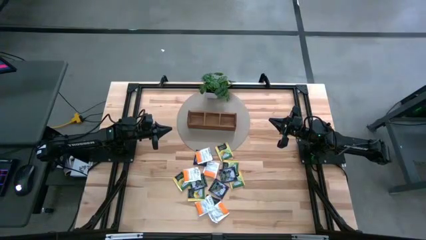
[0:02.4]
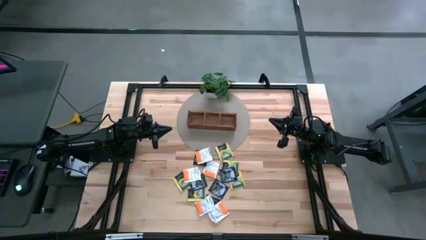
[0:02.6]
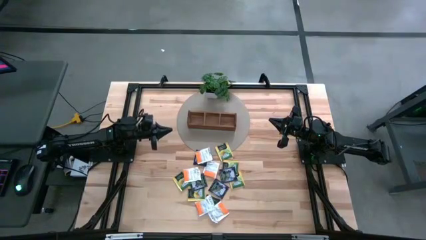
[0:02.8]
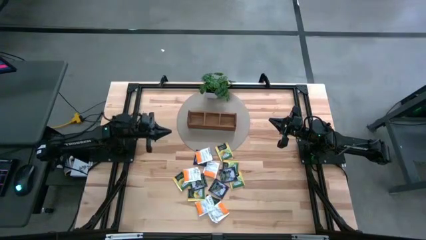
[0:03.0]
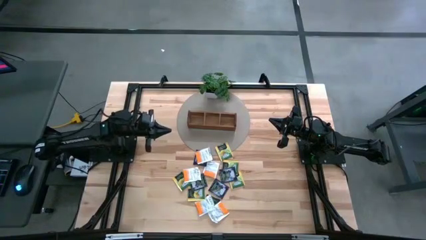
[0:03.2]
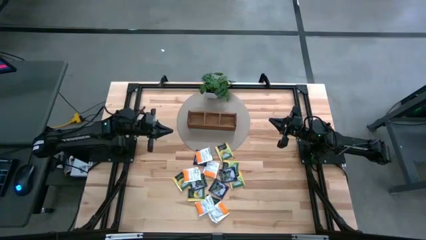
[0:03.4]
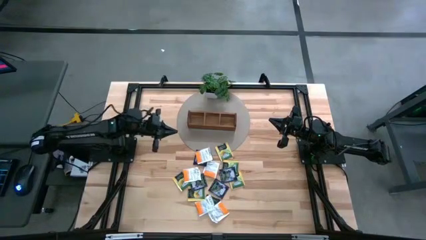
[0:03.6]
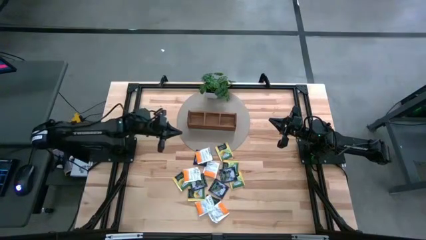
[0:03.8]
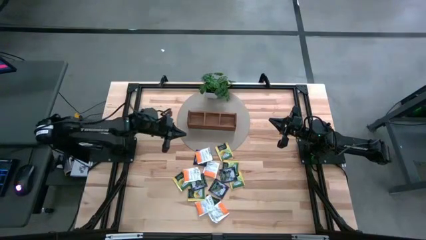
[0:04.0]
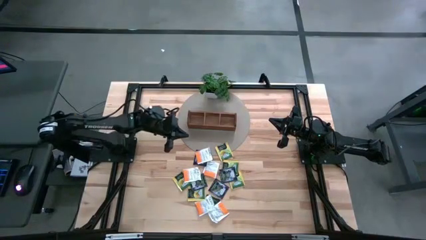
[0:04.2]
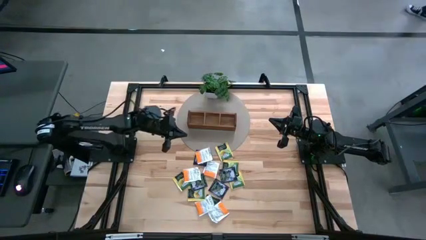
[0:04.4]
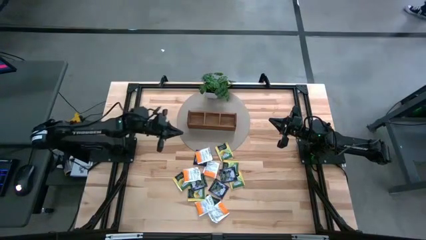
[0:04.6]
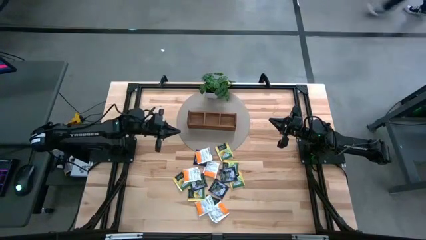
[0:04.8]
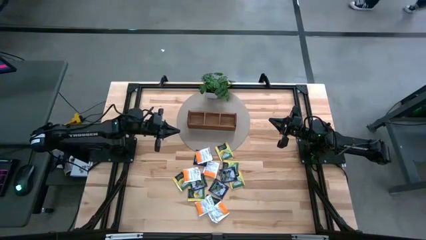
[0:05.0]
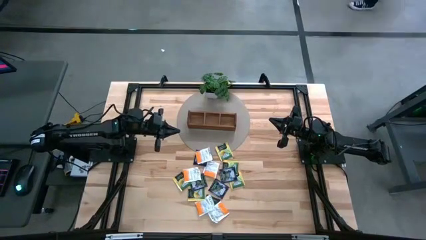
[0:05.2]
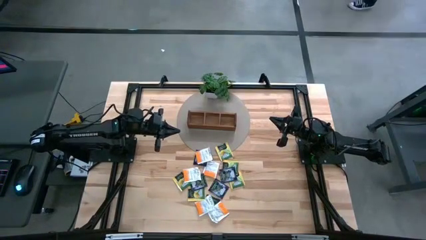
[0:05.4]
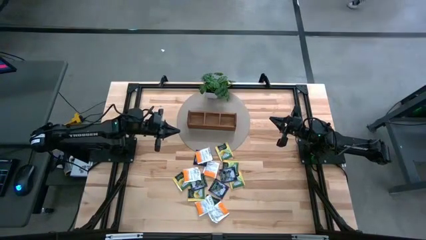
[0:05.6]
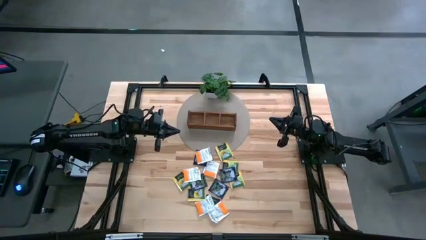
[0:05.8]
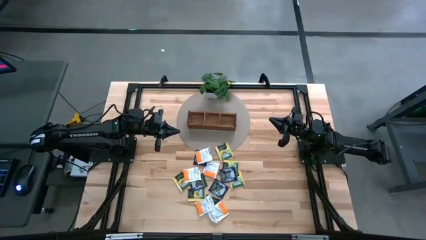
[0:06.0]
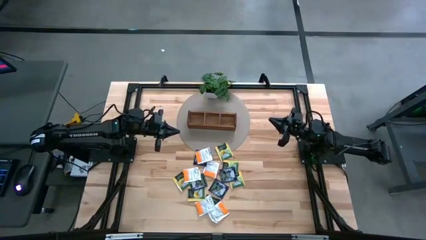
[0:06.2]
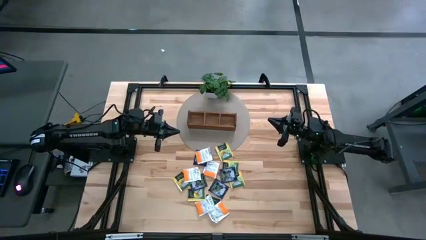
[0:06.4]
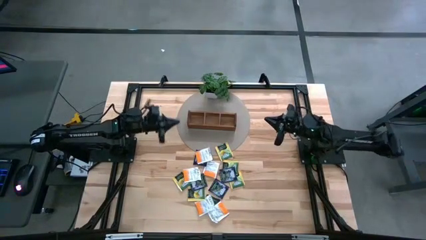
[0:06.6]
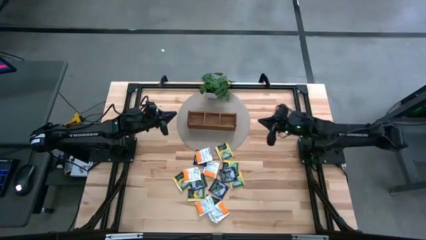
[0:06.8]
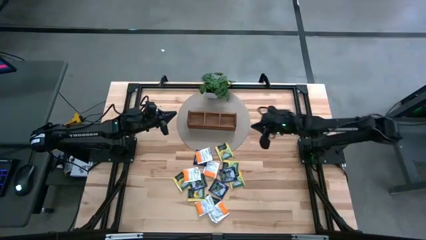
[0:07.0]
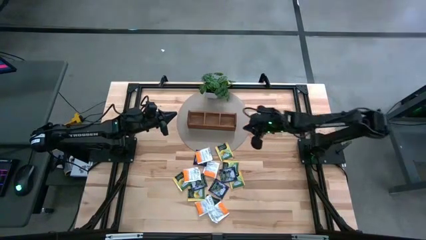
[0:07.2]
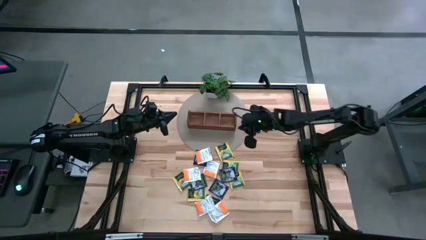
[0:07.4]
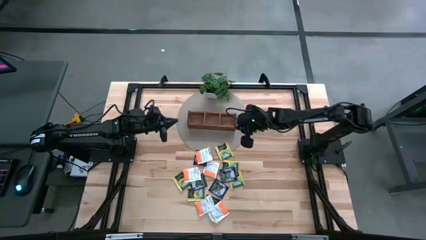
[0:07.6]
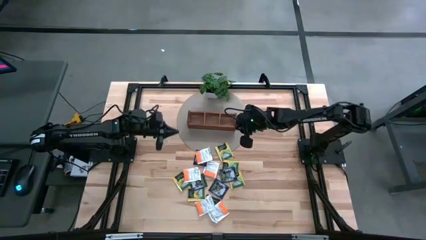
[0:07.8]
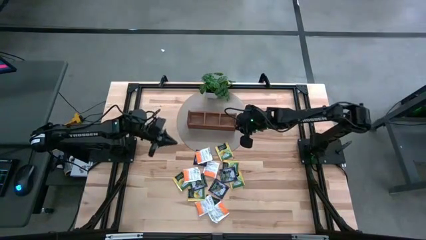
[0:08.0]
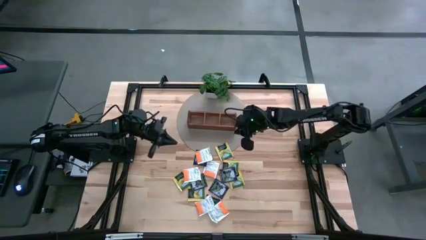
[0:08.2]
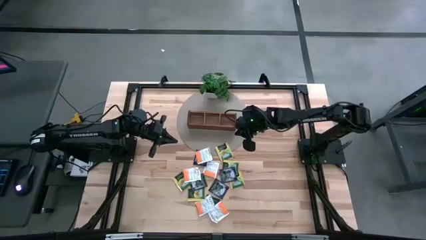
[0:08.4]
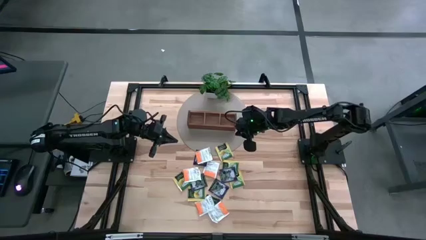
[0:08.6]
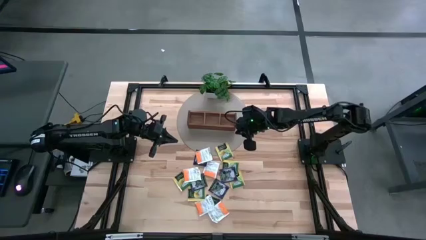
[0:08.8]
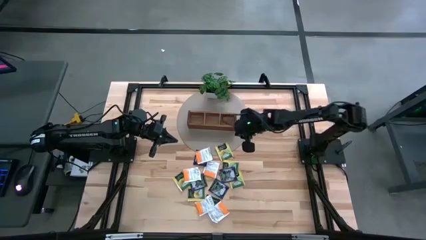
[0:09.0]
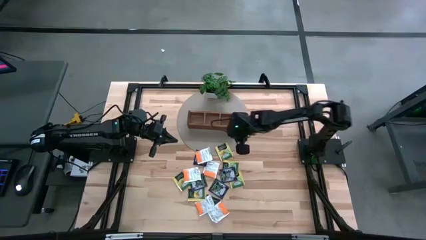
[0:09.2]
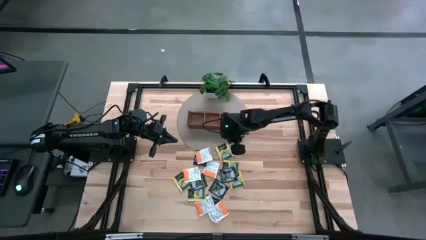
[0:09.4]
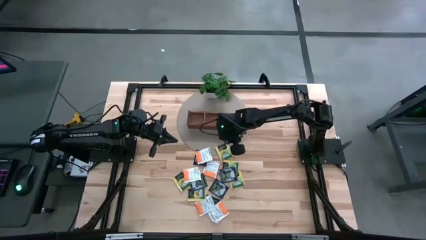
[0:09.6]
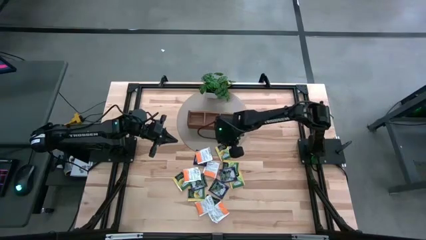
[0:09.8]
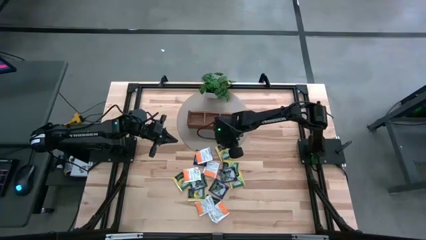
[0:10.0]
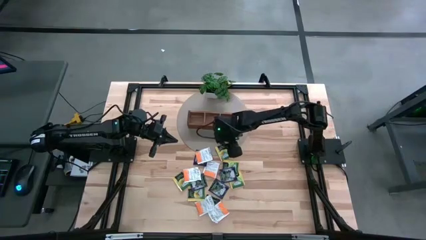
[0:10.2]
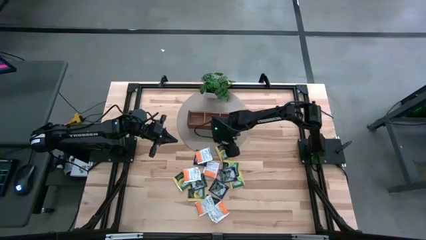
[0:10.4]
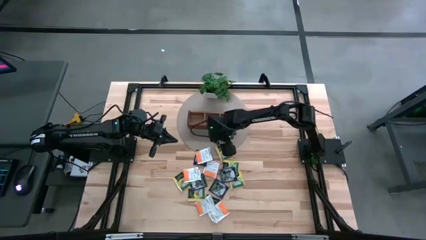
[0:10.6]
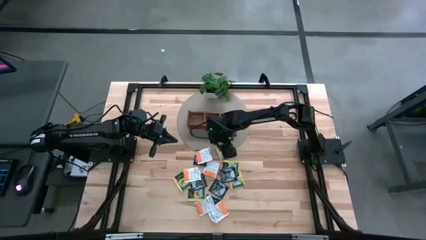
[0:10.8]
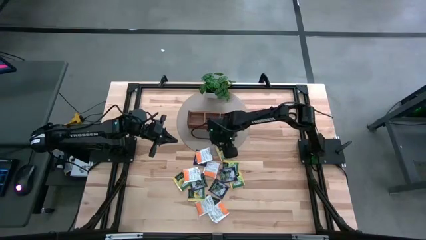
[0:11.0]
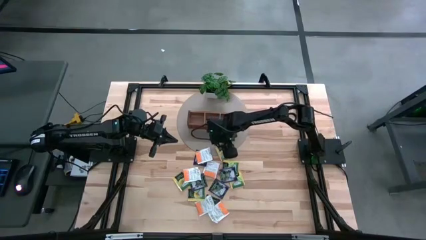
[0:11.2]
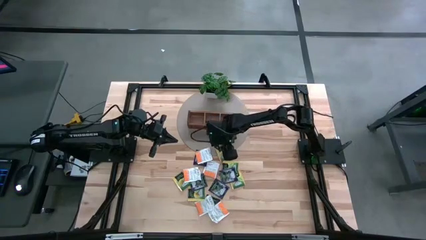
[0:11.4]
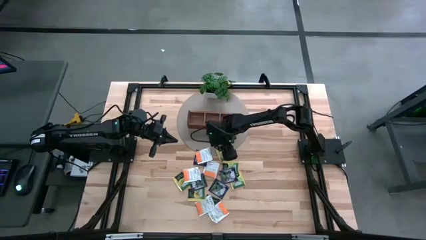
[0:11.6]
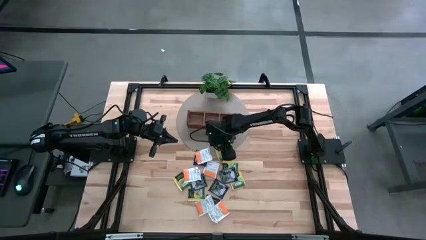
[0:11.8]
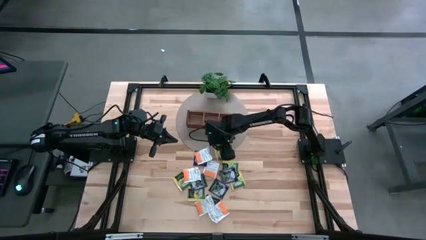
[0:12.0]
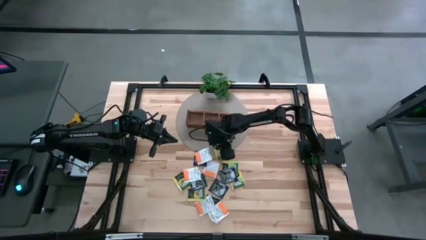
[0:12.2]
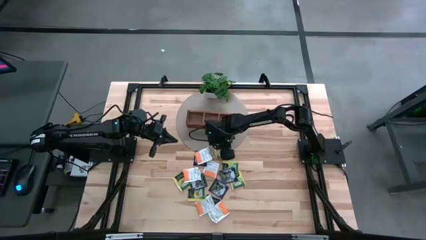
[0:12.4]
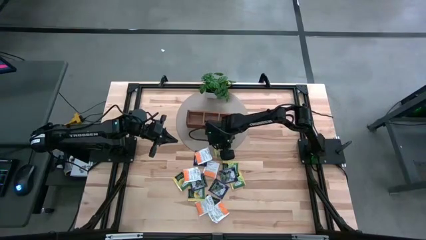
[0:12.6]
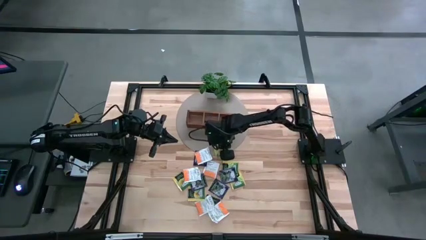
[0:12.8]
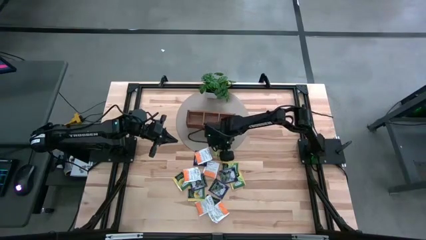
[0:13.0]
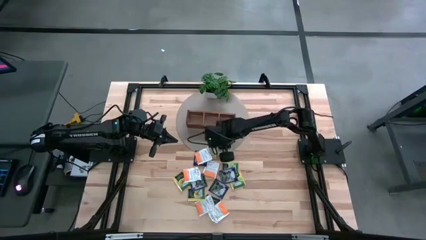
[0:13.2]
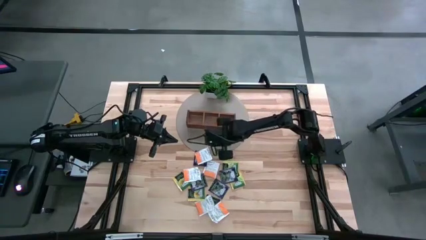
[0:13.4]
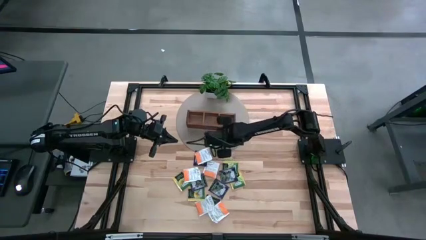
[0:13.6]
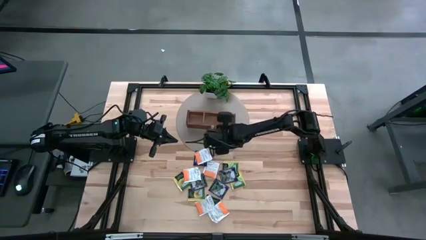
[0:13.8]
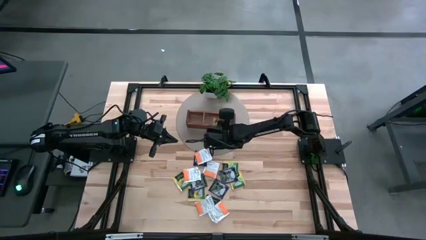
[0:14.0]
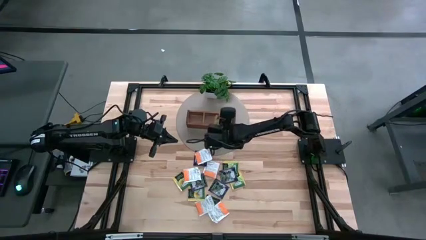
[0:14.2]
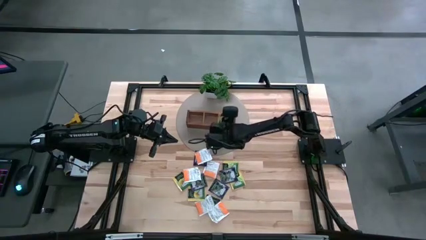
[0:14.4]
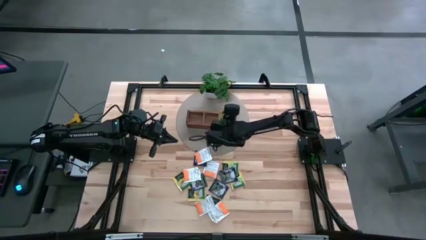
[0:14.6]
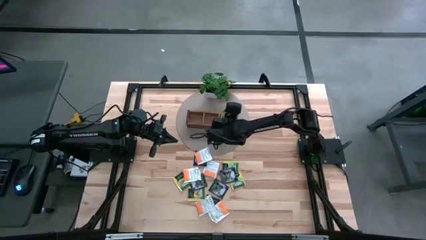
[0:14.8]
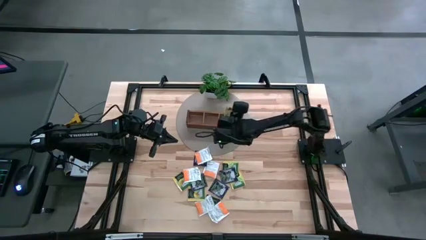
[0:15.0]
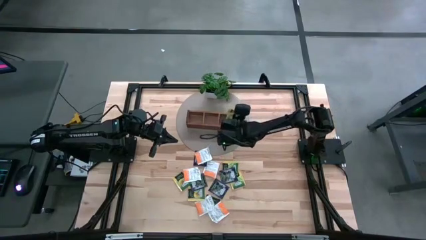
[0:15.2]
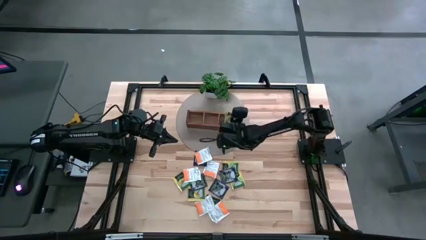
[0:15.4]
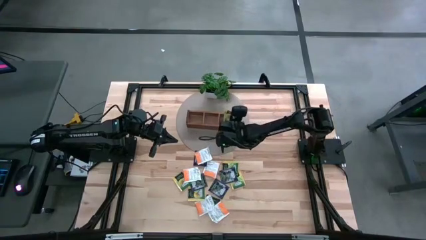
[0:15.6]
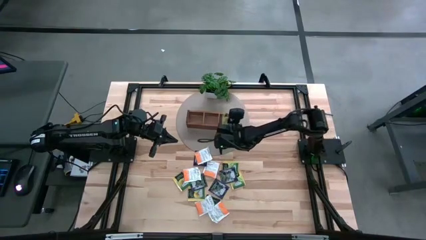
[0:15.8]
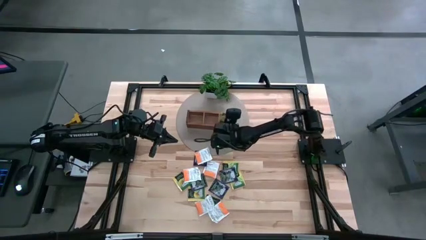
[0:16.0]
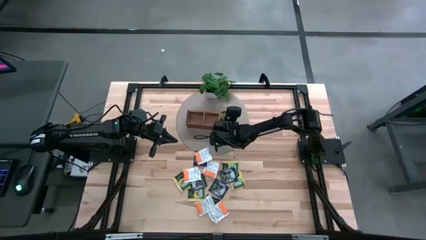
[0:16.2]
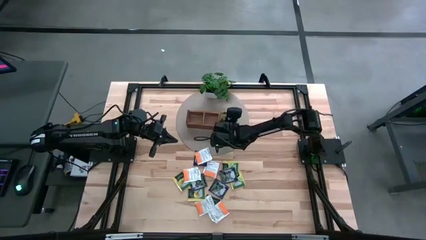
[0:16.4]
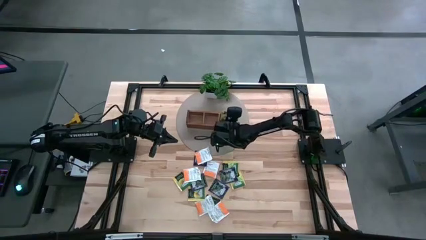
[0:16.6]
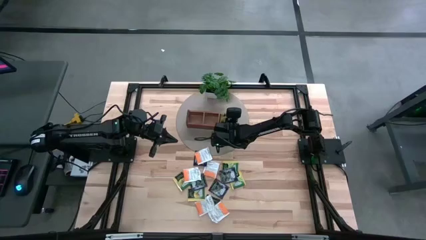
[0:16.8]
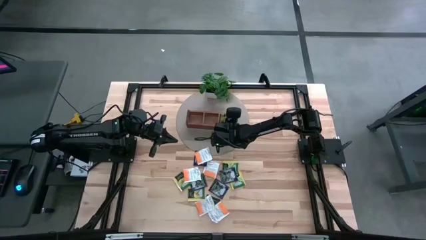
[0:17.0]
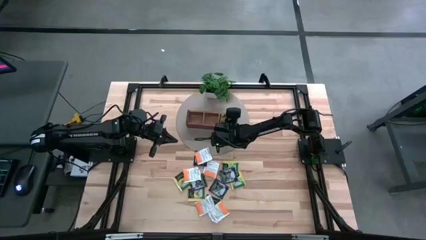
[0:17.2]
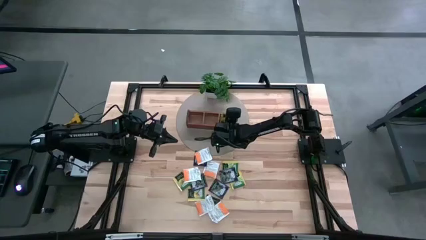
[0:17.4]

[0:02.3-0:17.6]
Task: Pick & Place Tea
Put the yellow tea bag into the right section of the wooden organizer
